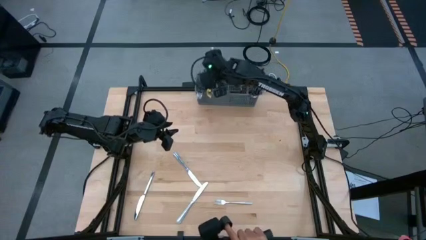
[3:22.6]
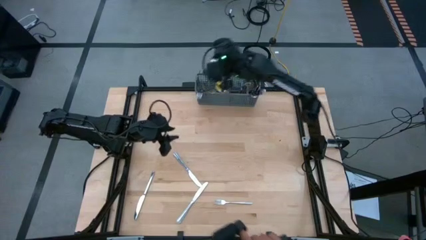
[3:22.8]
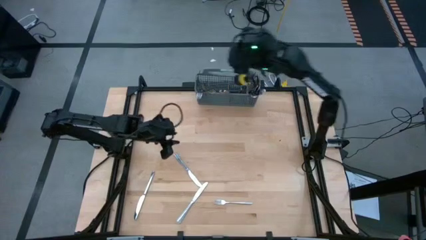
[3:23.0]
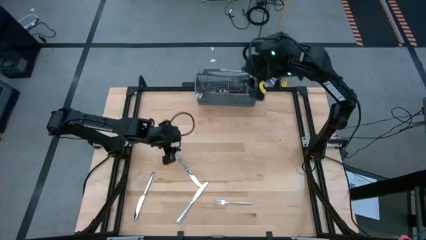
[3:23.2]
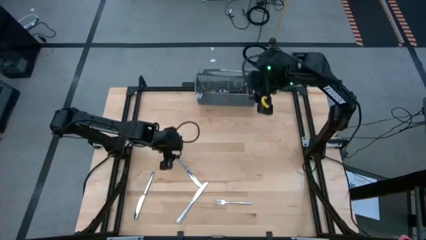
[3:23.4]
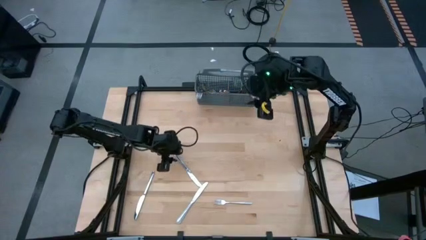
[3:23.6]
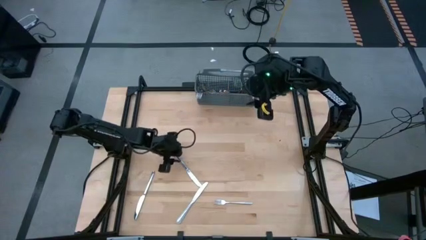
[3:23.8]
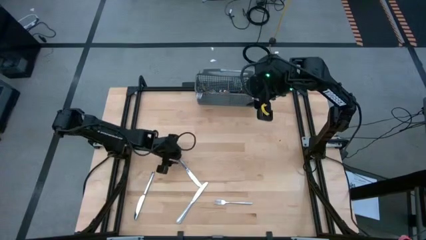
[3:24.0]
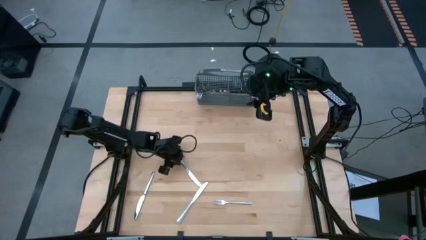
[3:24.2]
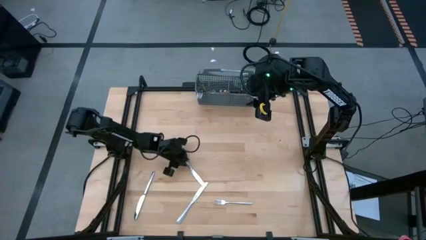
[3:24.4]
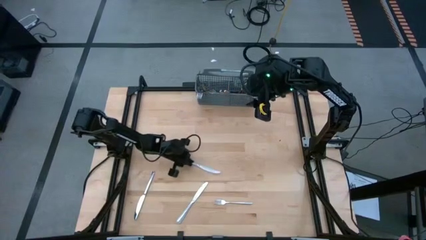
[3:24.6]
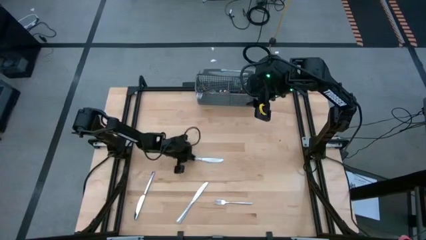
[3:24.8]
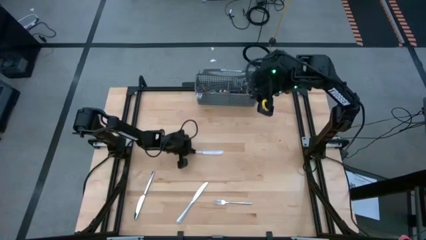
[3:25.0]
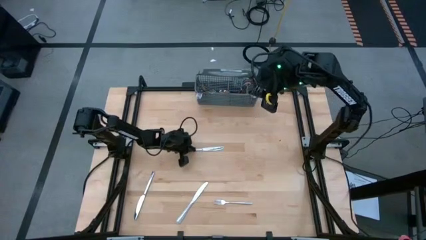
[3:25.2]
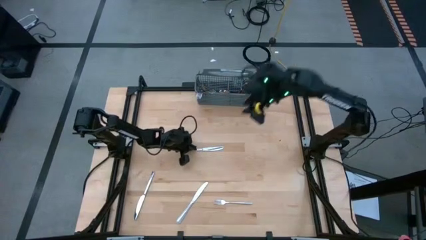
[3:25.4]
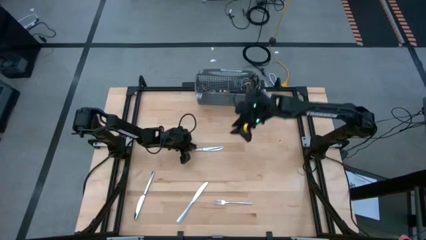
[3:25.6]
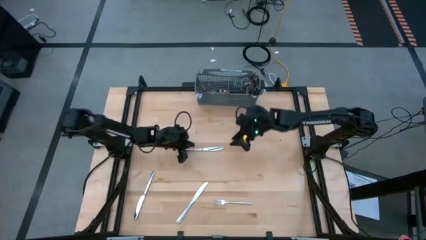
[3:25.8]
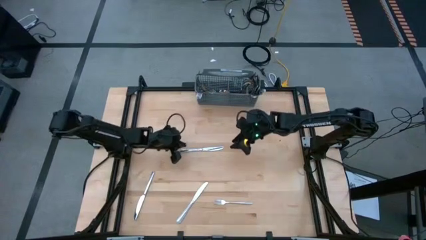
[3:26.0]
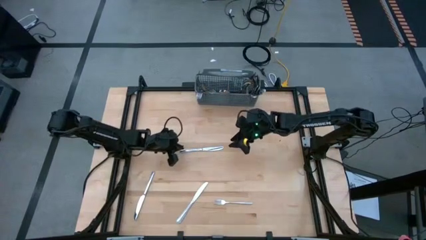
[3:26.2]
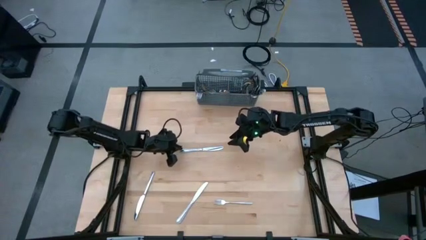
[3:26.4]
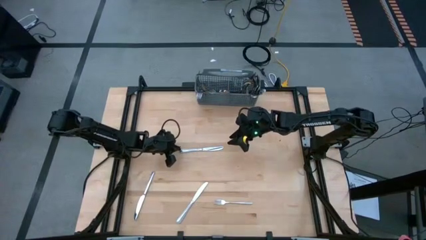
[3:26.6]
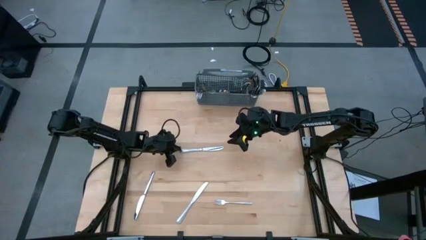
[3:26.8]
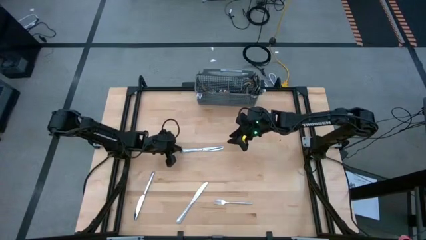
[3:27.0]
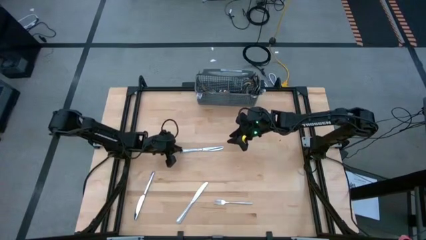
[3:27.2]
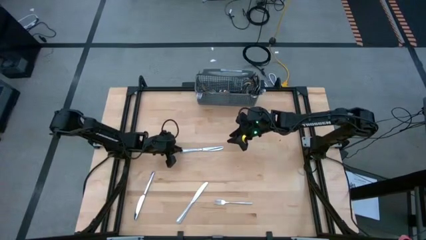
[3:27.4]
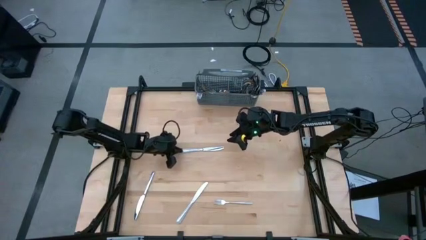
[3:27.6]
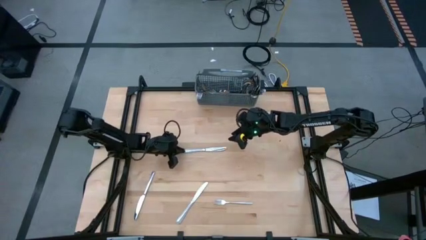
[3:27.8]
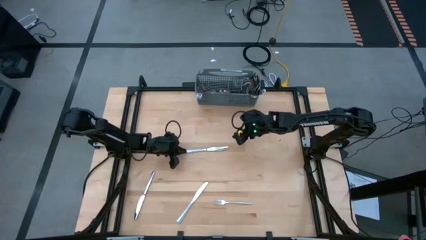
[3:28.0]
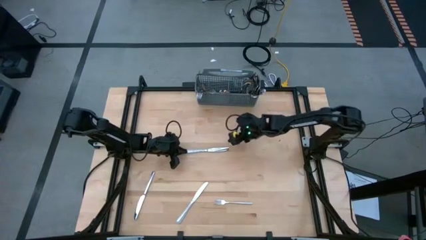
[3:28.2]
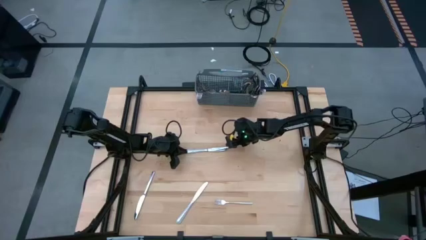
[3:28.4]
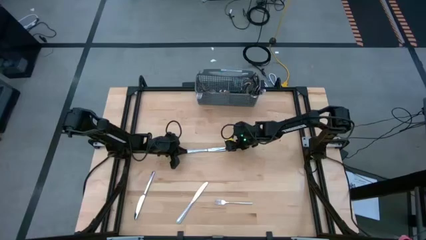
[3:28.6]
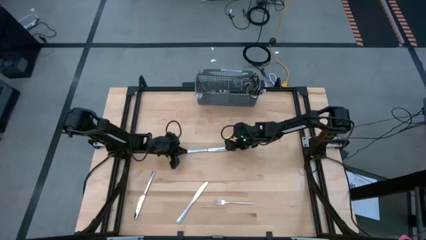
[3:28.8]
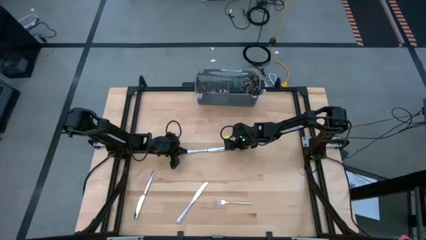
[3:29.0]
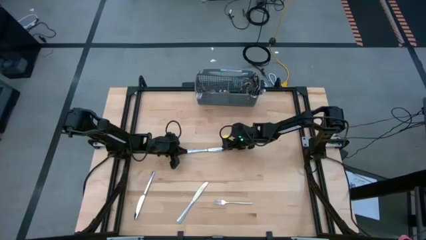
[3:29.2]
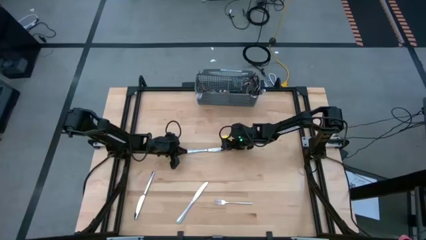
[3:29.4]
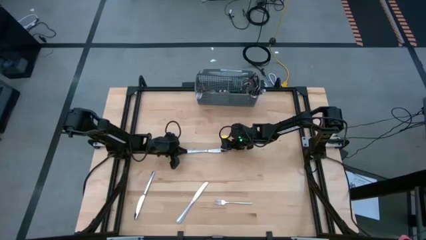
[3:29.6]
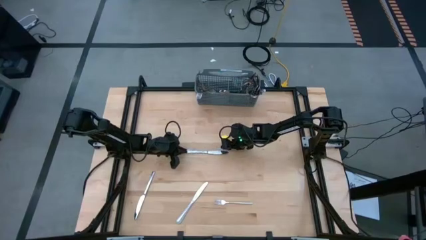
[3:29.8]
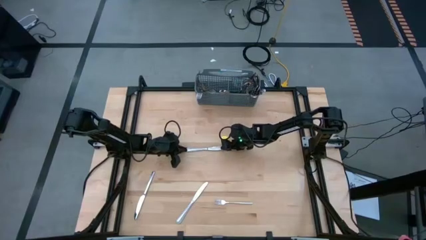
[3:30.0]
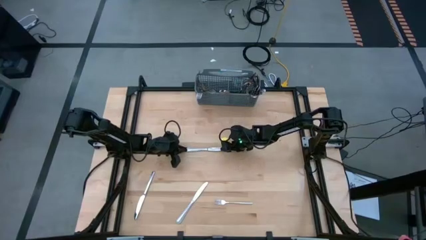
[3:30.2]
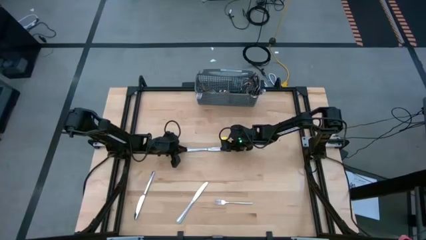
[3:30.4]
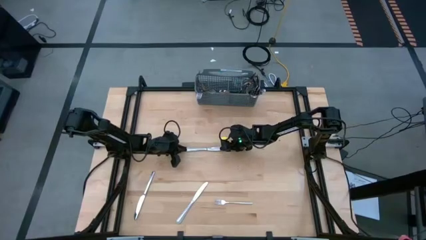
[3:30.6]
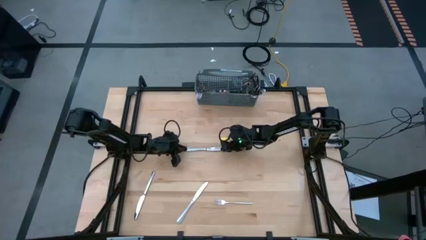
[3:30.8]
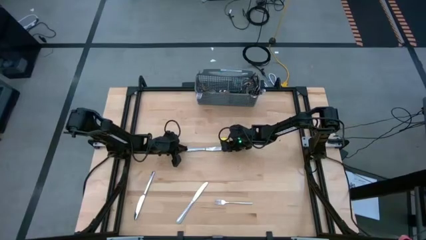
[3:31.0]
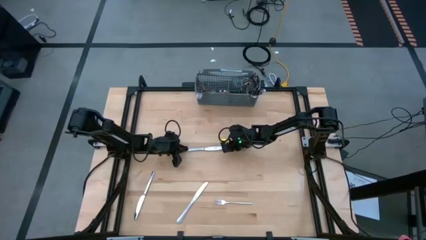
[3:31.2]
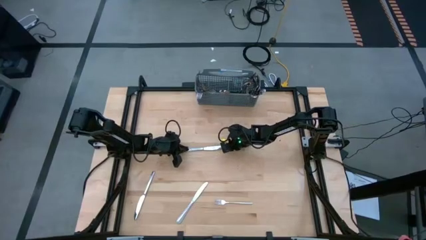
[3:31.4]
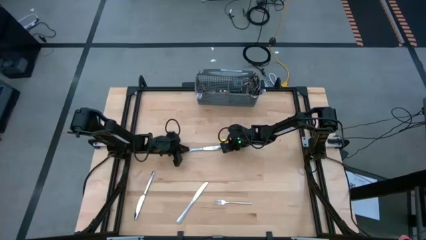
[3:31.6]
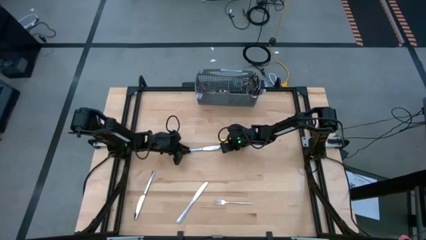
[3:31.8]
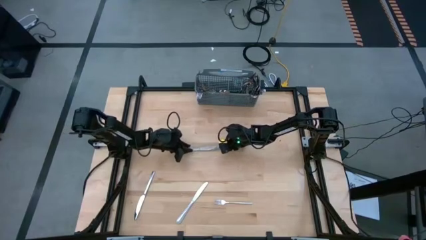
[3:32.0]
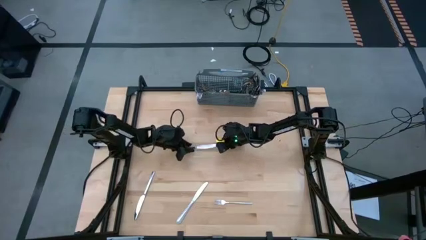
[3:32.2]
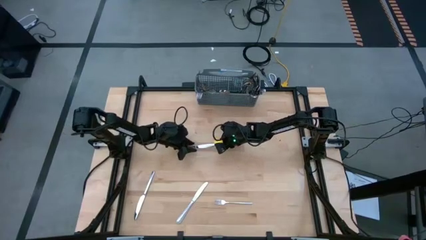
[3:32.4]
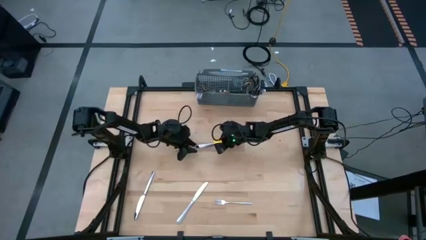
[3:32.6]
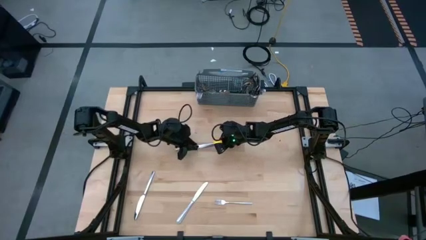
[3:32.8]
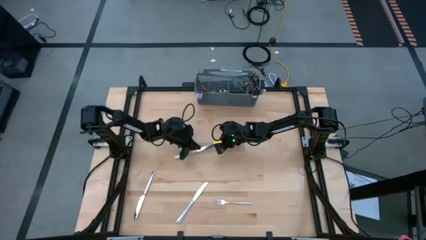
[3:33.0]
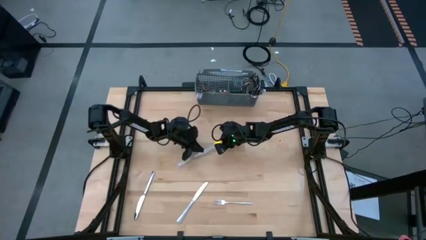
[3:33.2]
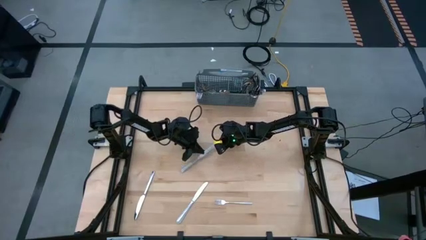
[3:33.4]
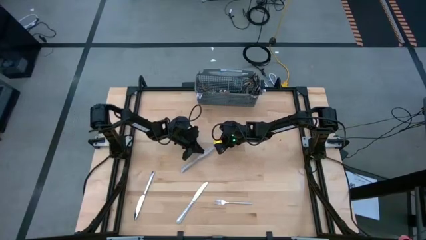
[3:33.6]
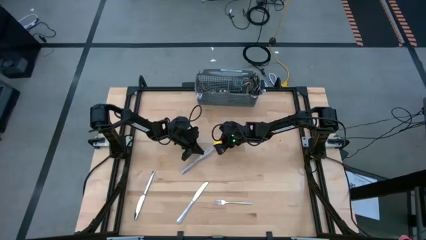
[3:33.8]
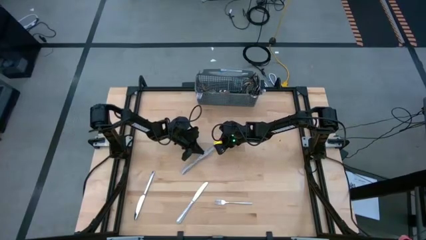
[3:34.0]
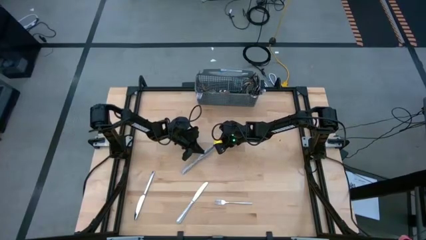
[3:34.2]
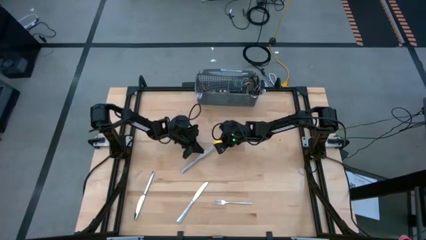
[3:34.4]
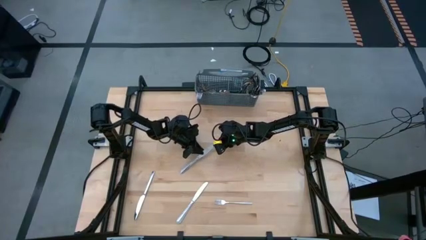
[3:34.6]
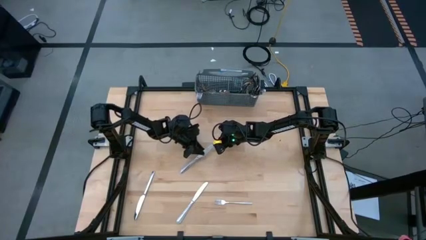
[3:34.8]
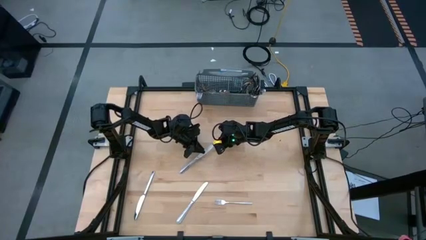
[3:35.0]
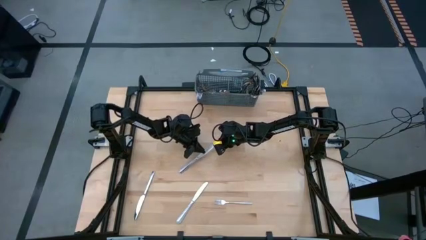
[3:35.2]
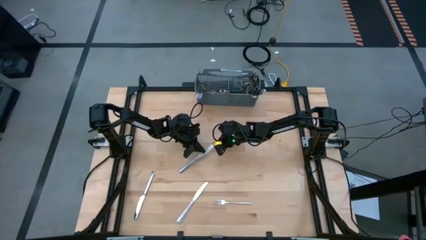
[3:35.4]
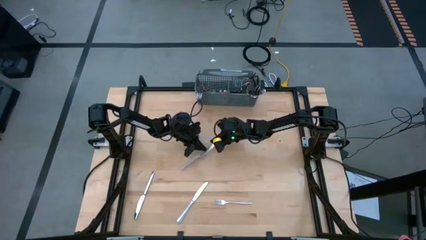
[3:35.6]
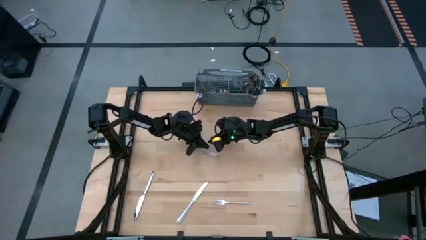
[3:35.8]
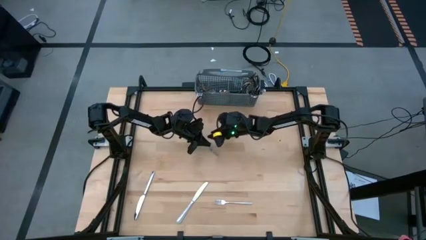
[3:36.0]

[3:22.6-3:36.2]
Task: Sort silverware
Put the silver table knife into the silverware organizer

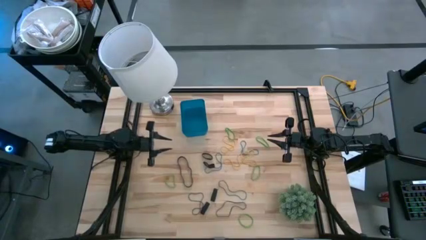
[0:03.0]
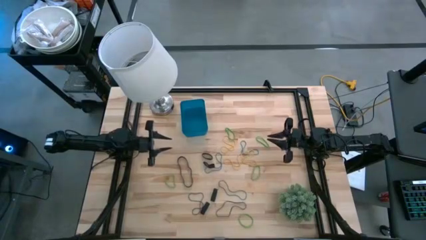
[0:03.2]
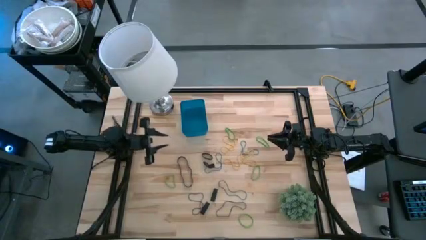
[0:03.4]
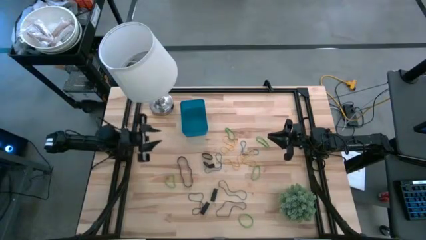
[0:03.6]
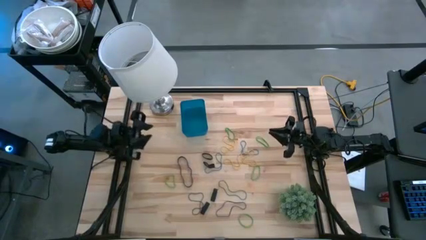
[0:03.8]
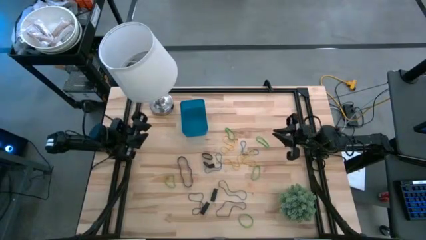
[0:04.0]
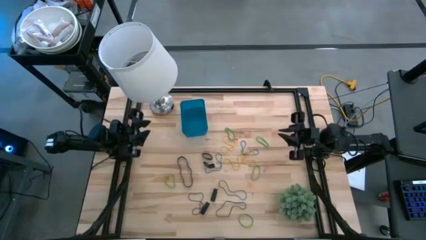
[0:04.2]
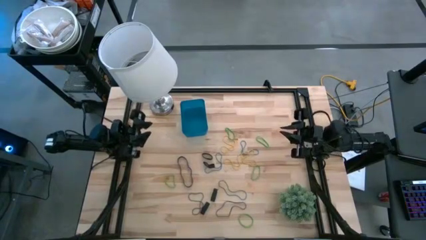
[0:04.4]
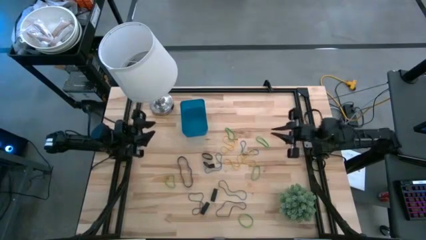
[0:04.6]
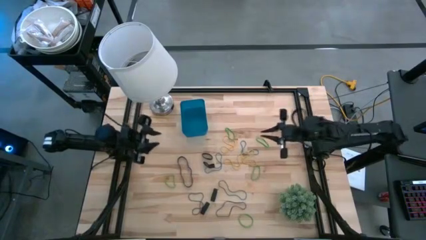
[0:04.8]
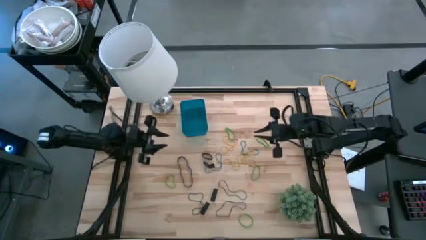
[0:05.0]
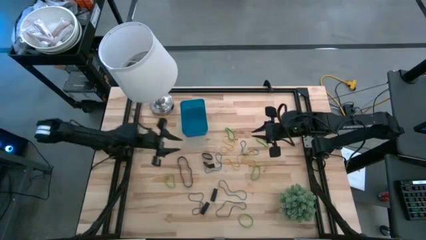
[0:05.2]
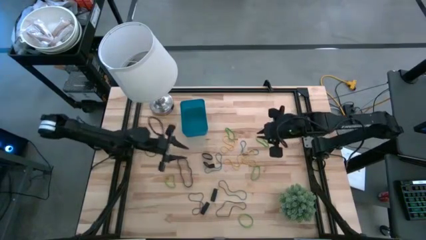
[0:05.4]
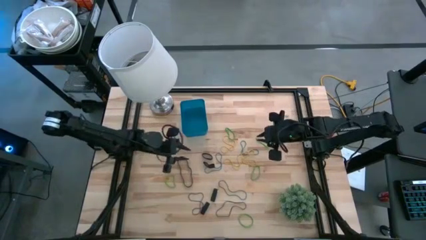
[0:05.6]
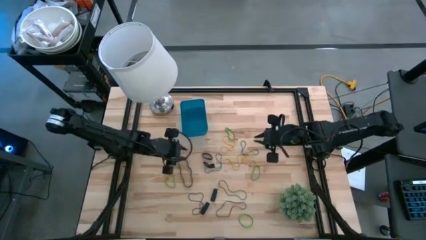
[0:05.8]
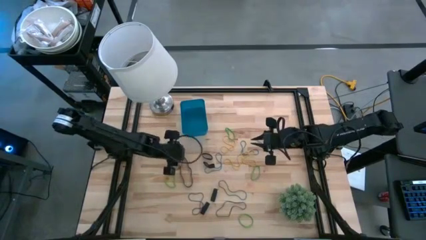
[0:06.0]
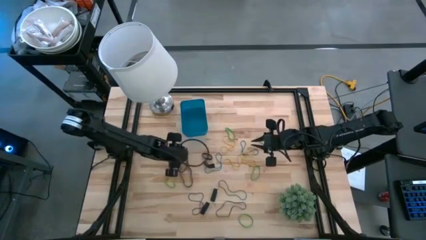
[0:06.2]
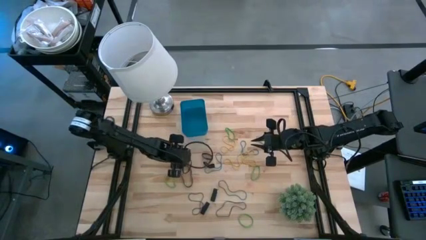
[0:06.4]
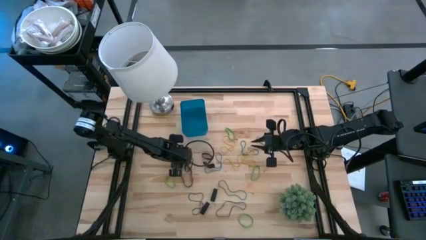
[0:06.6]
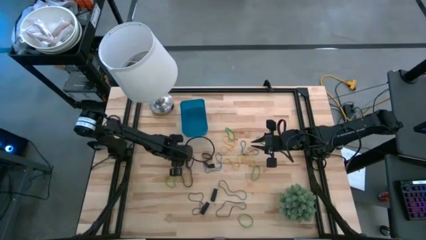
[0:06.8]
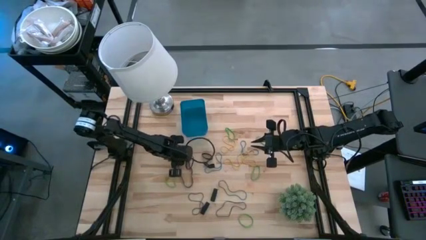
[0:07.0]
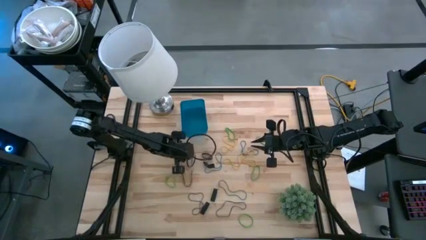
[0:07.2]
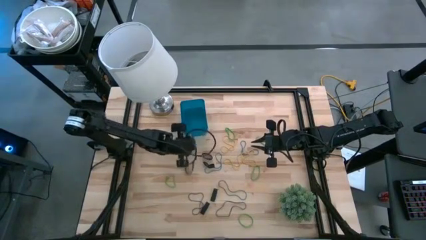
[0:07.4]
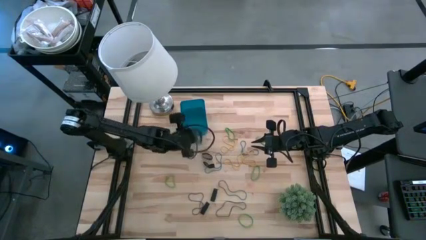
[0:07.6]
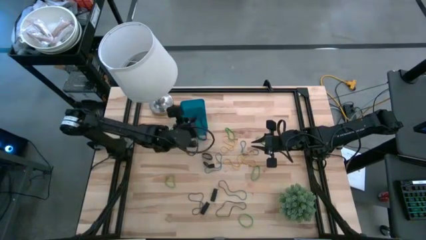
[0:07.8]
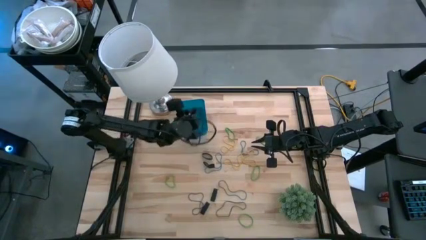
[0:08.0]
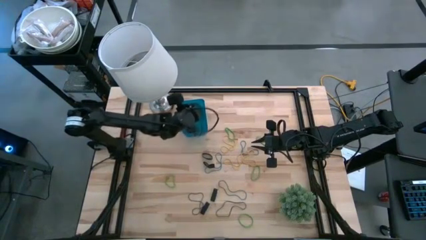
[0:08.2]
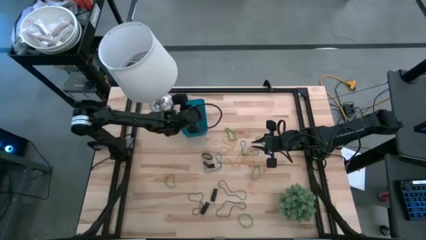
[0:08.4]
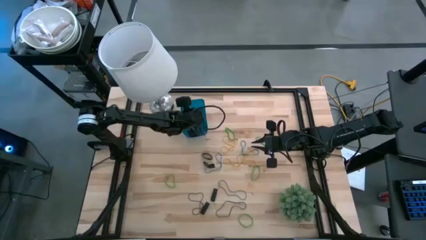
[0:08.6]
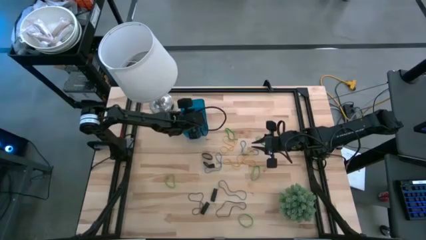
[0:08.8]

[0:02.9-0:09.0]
Task: Pick and place rubber bands into bin
Put the big black rubber band into the blue bin
